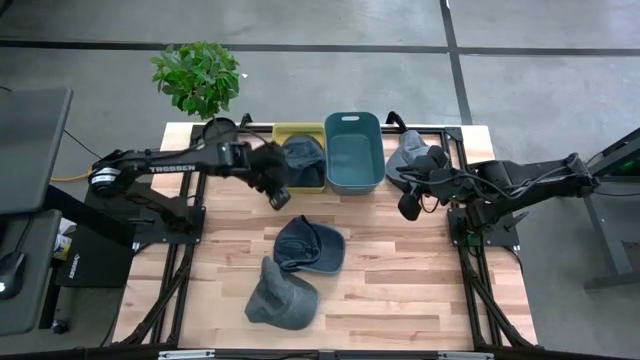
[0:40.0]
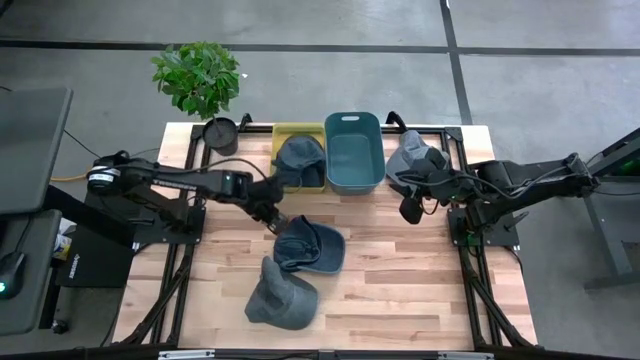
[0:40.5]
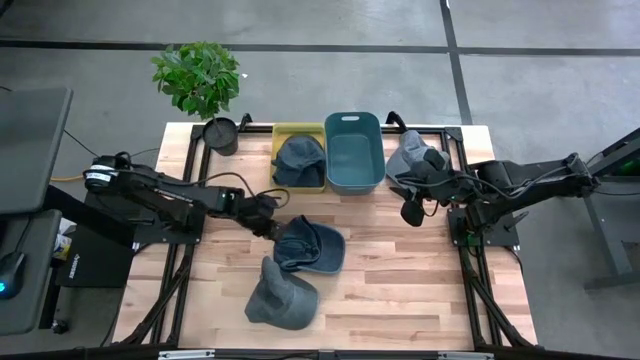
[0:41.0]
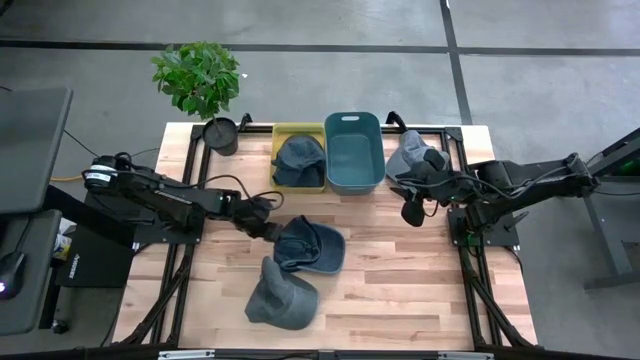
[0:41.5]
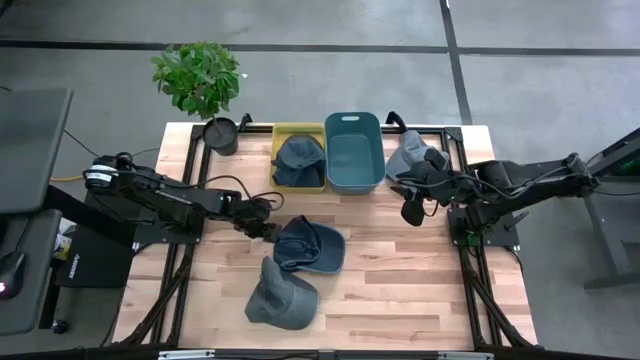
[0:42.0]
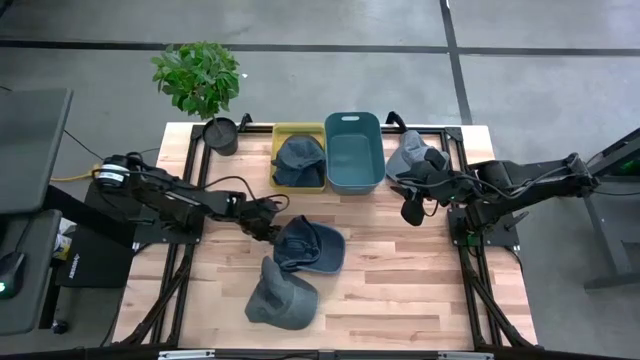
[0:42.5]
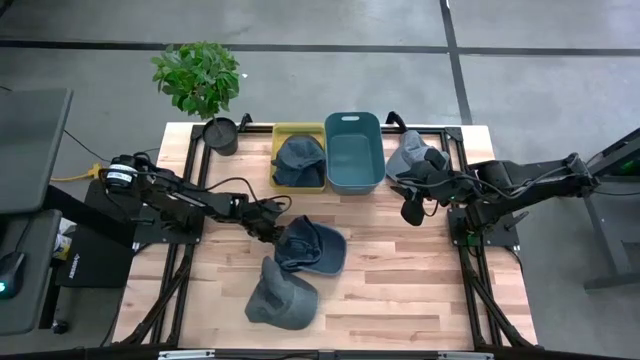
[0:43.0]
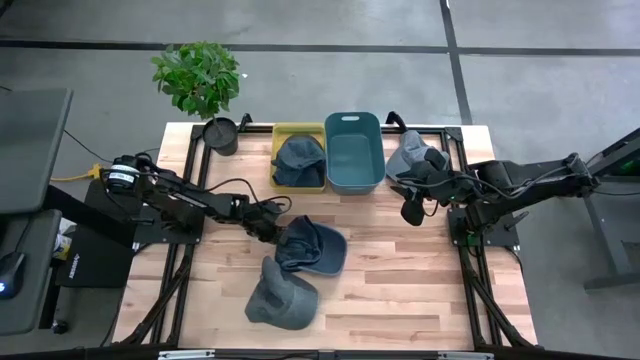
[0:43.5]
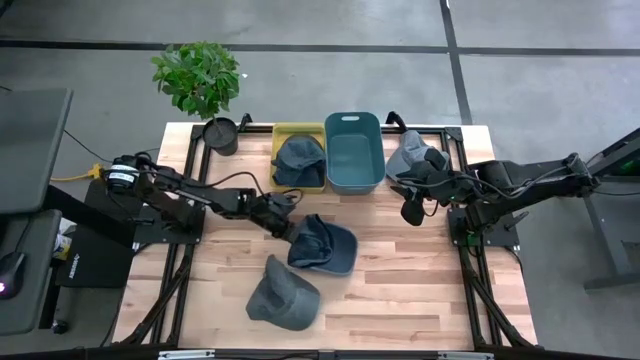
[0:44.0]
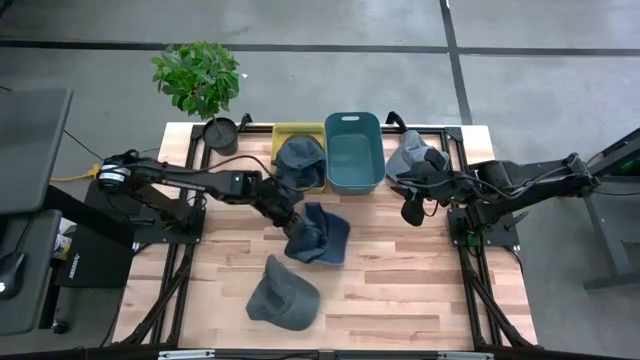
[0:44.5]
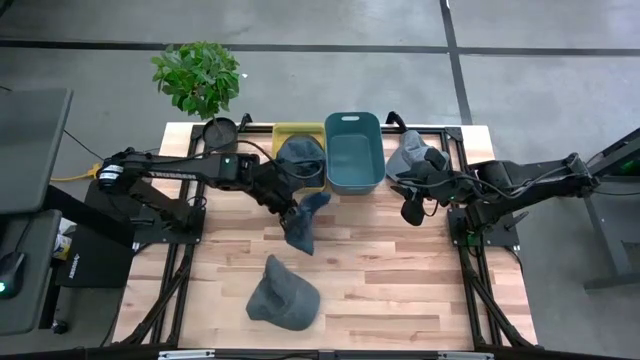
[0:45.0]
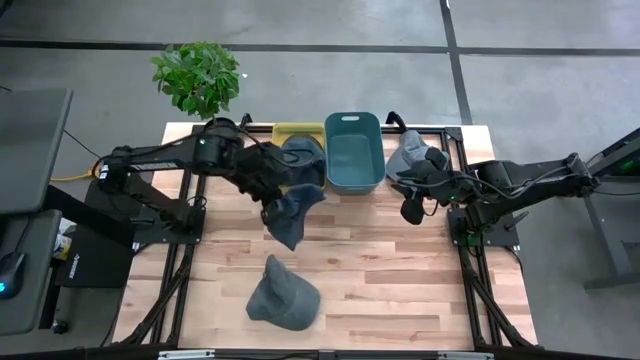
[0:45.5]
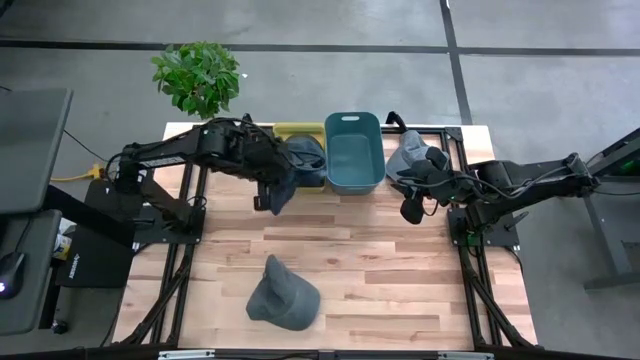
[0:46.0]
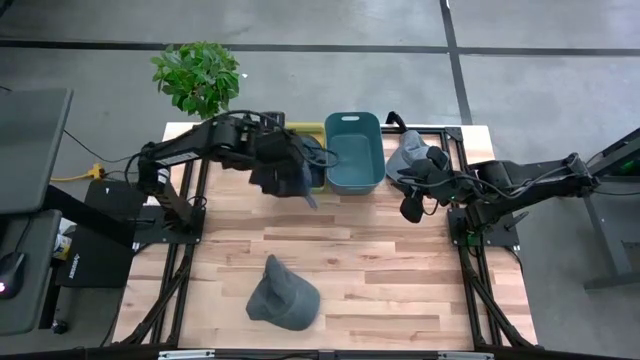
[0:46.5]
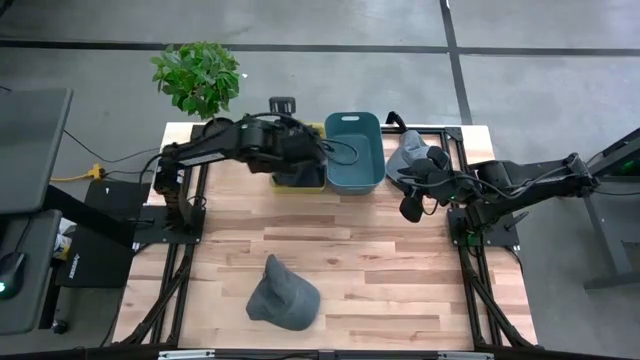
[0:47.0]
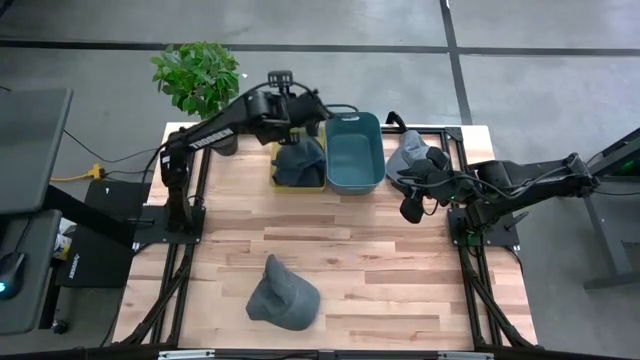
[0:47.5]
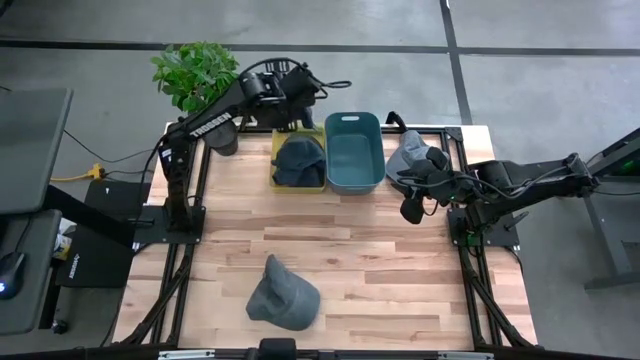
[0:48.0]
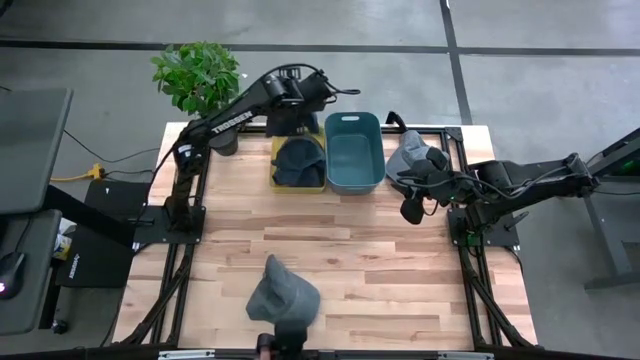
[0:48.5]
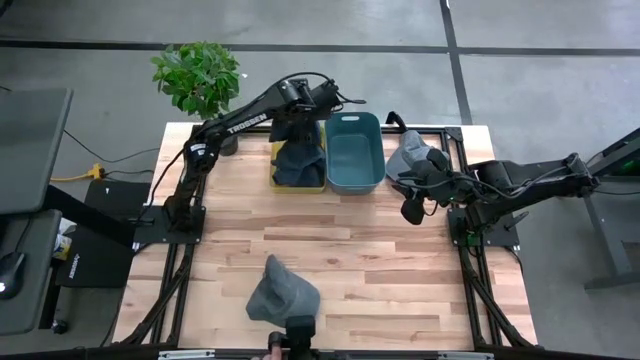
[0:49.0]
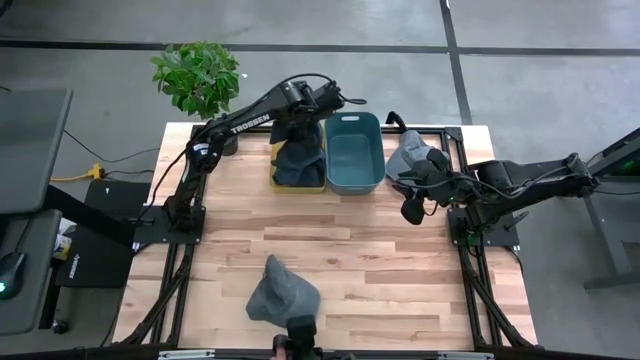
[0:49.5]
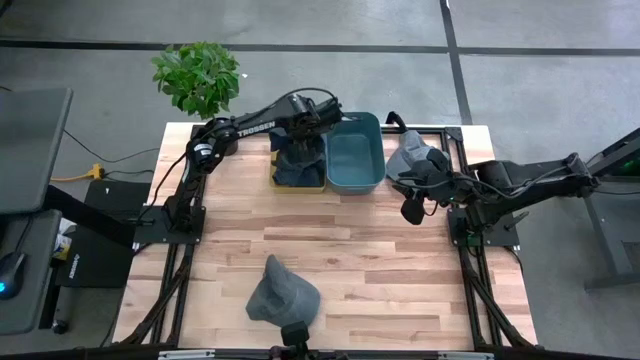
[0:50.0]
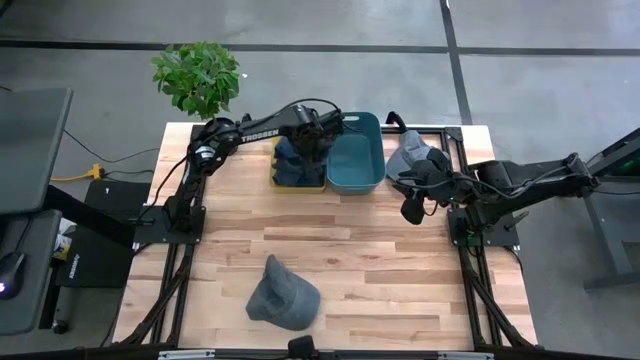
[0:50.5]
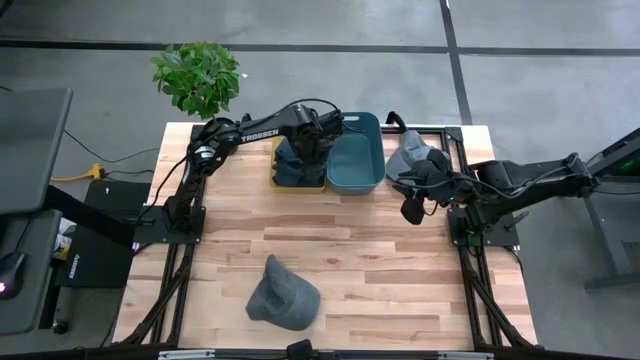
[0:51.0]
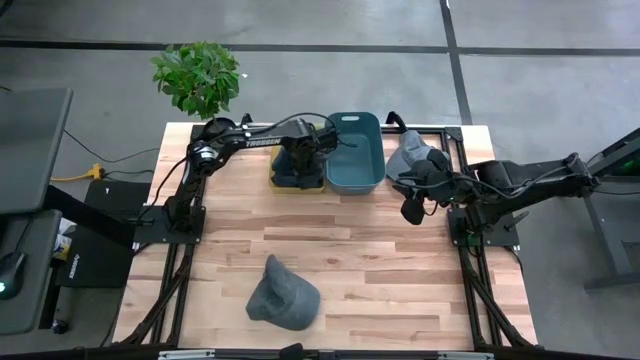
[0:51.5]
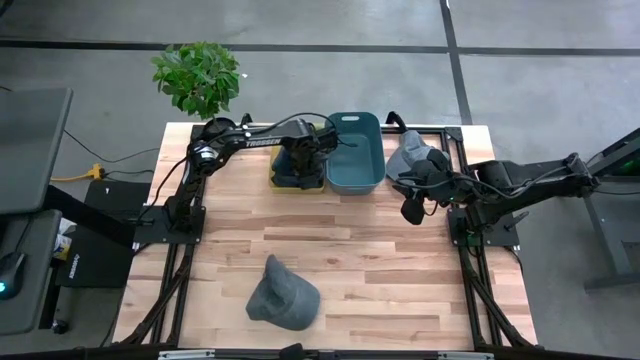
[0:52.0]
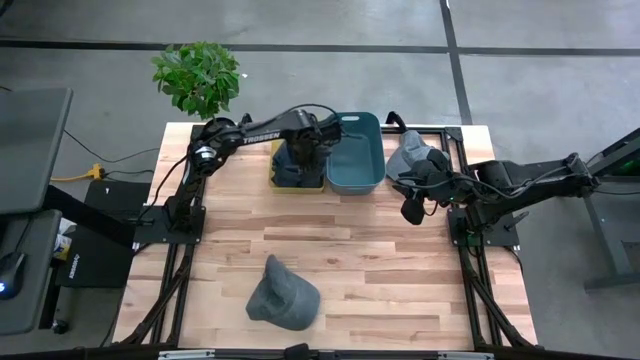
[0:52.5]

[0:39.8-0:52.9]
Task: Pick & Place hat
Put the dark blue cap into the yellow bin
